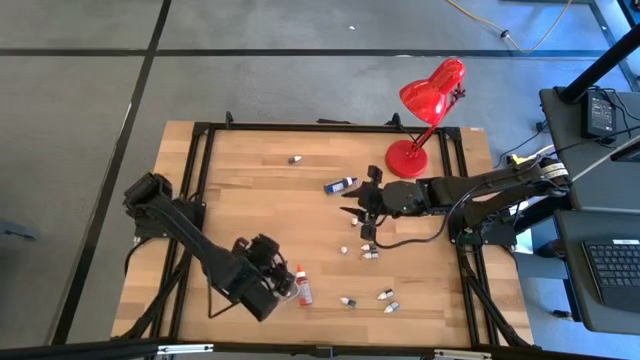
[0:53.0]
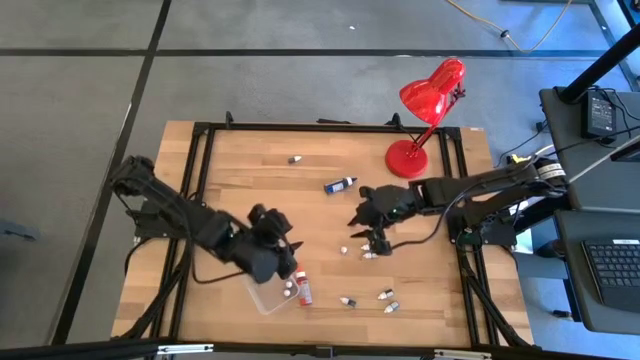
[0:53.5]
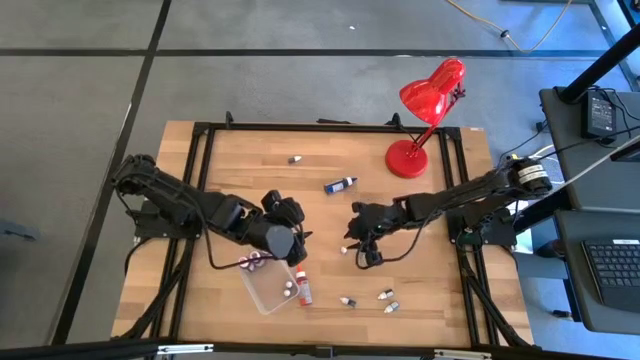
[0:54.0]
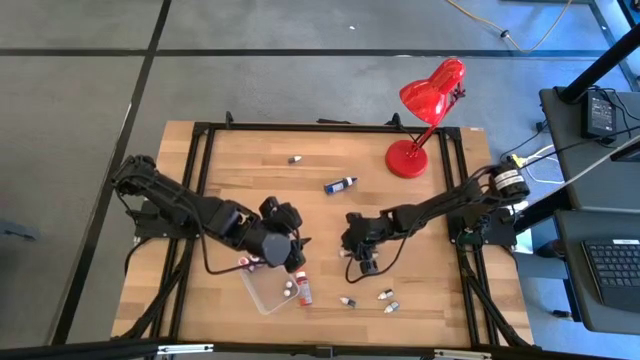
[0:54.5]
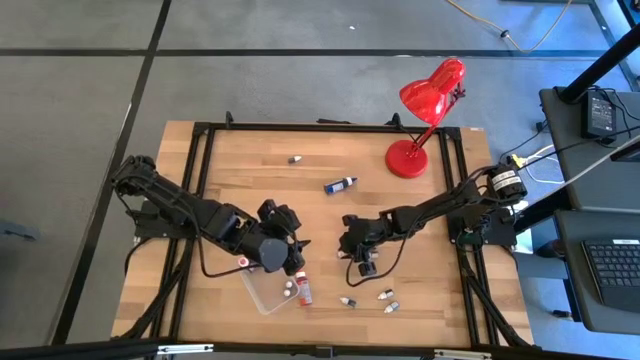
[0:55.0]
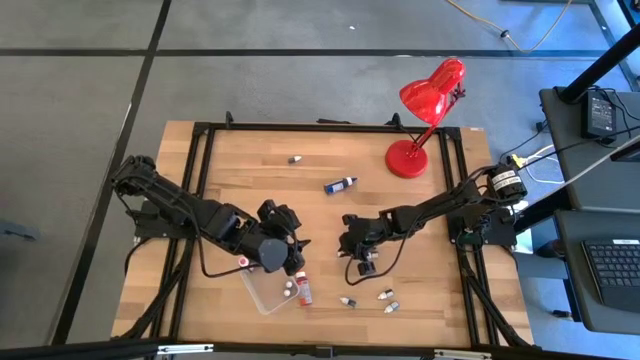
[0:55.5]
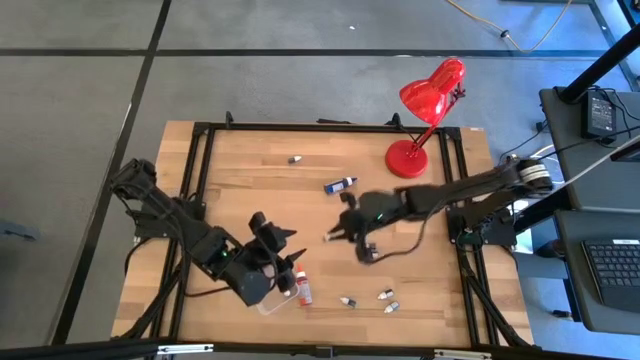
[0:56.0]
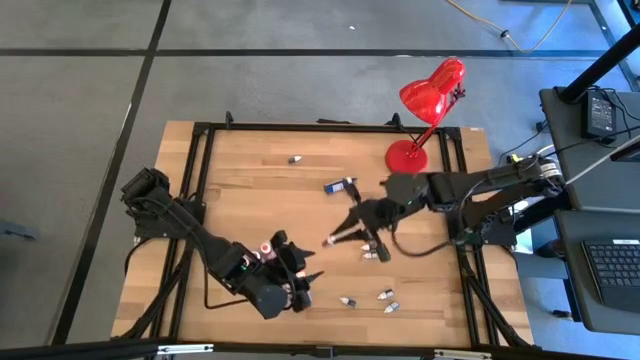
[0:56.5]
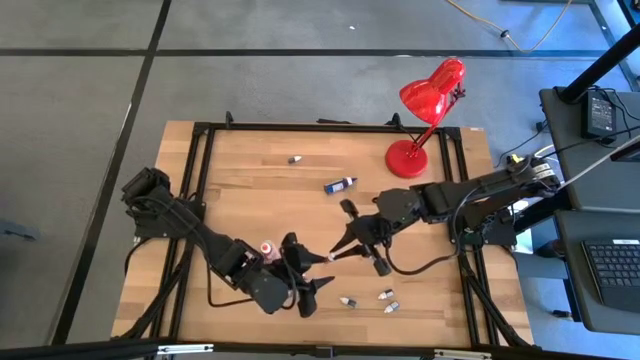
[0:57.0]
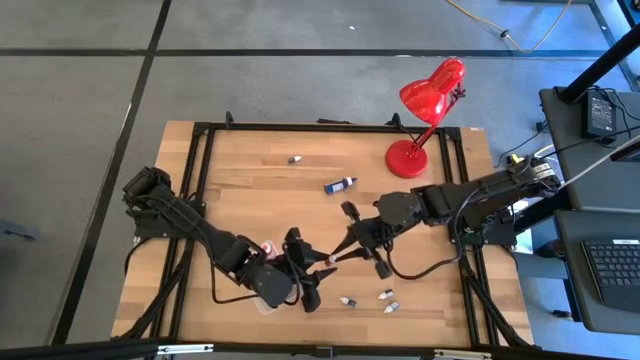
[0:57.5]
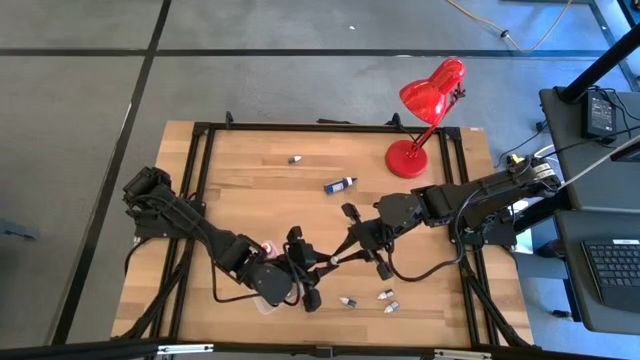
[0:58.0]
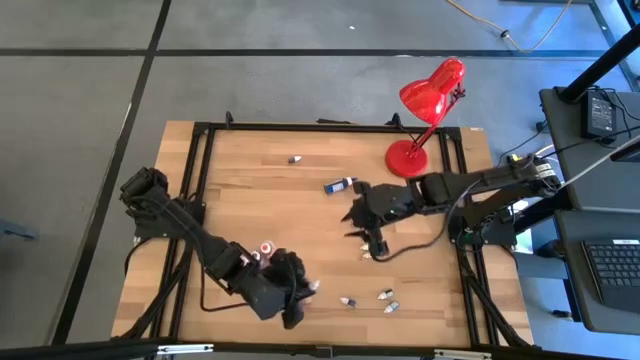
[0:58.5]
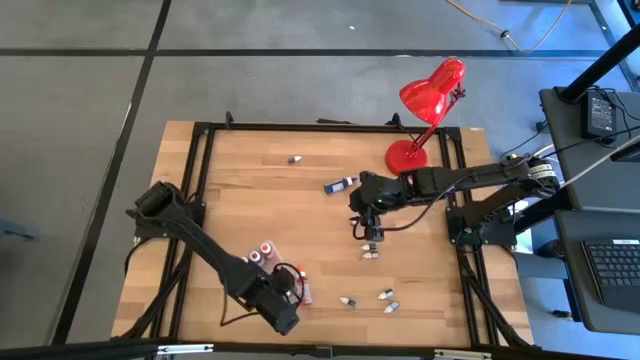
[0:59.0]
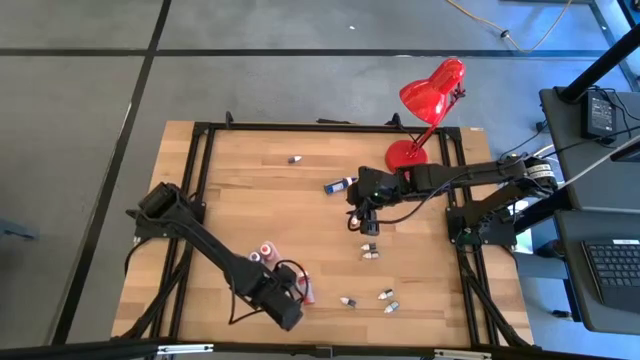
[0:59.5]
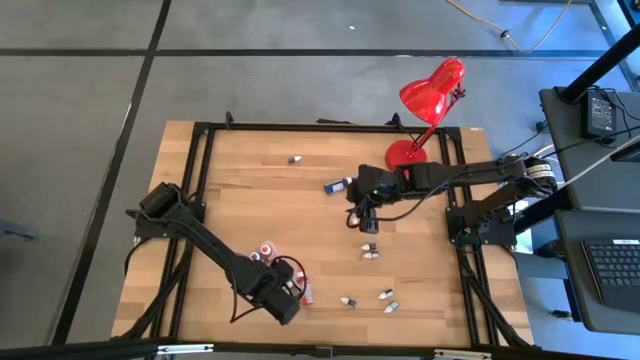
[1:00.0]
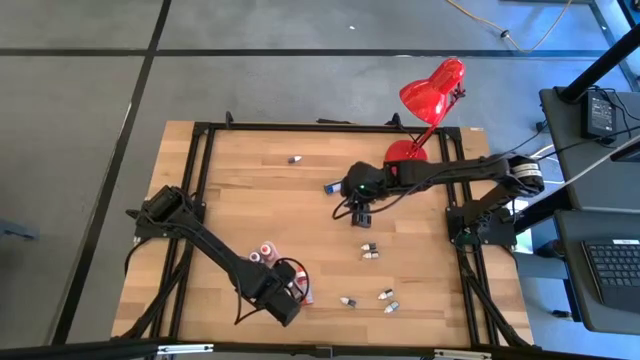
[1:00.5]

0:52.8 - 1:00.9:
Task: Pick & Place food coloring
Put the pink food coloring bottle into the transparent bin

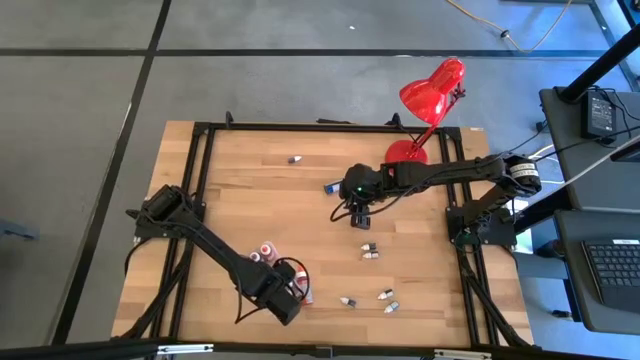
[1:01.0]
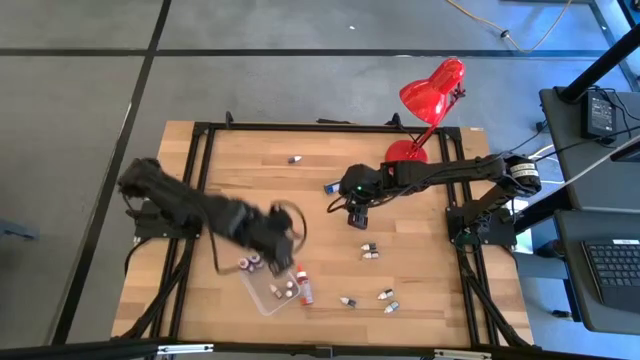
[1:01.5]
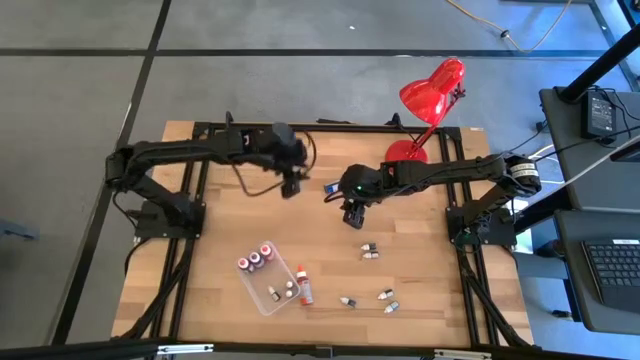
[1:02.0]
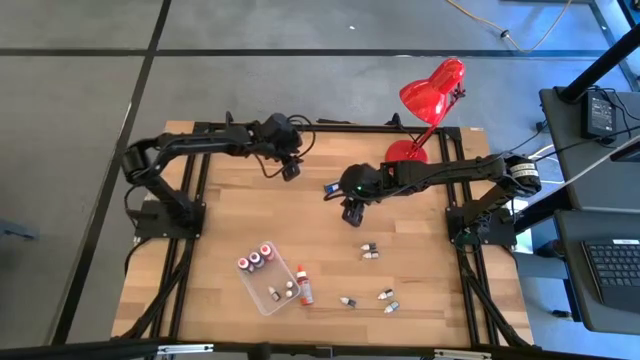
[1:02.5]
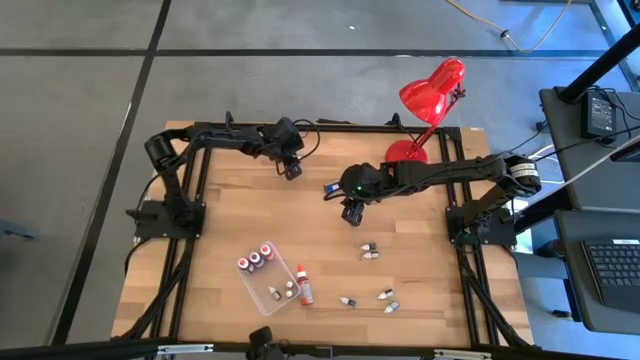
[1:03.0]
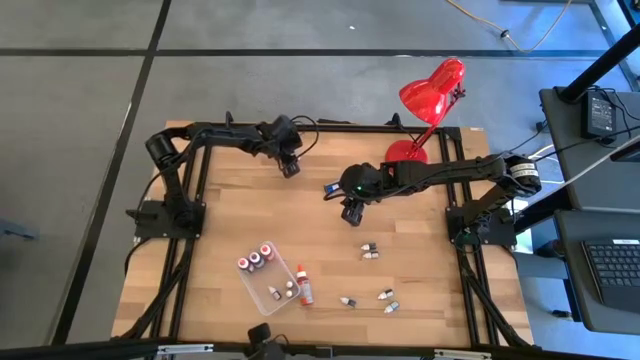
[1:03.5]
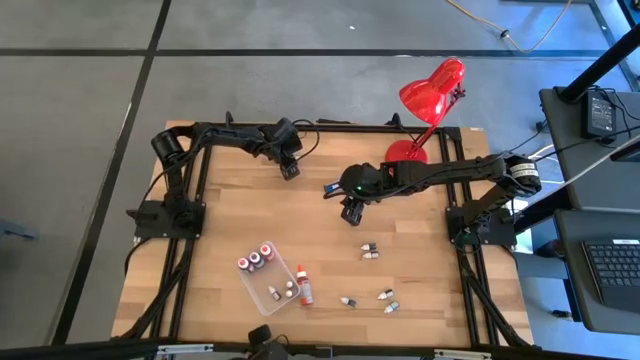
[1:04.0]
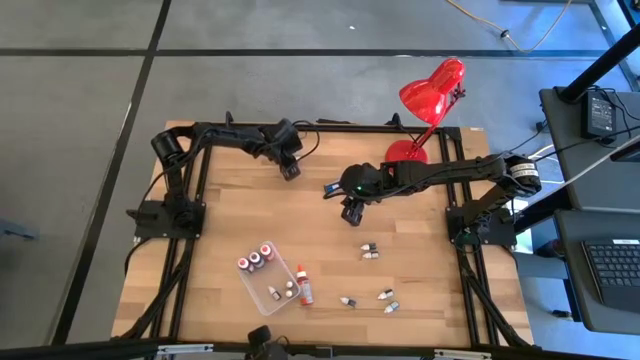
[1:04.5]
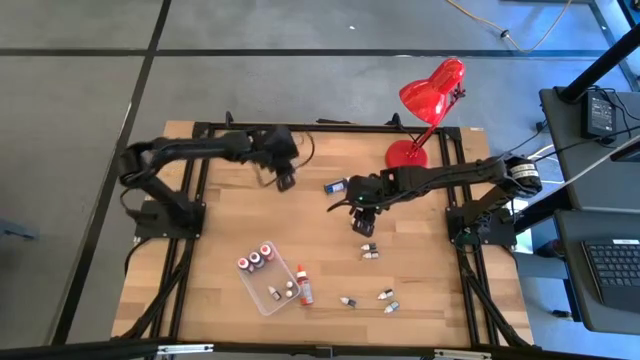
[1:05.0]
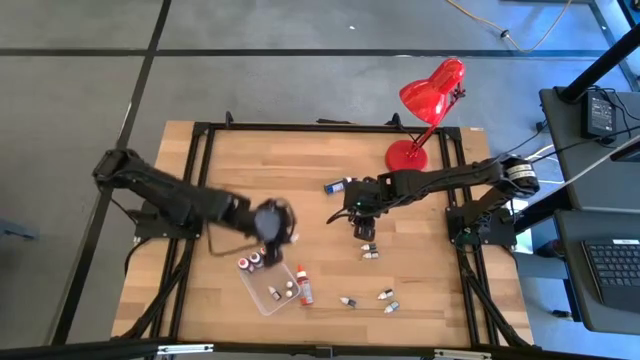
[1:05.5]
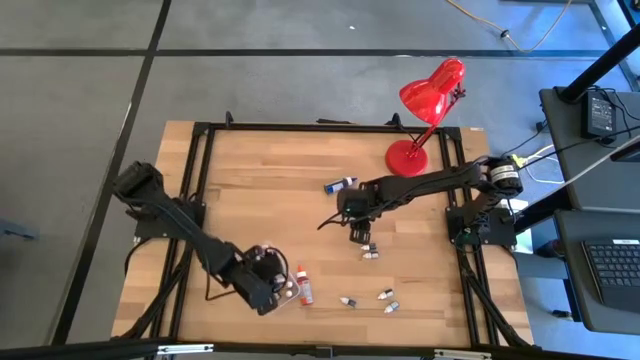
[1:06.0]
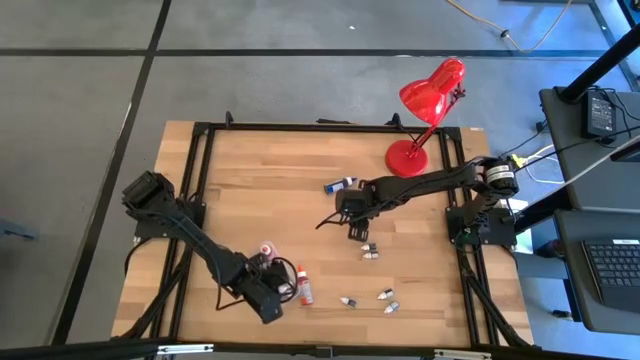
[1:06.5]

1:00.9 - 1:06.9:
Put the green food coloring bottle into the transparent bin

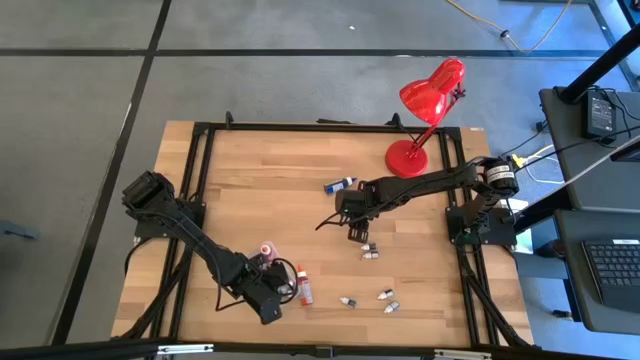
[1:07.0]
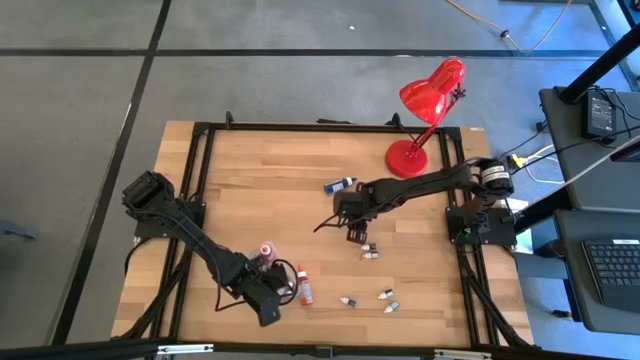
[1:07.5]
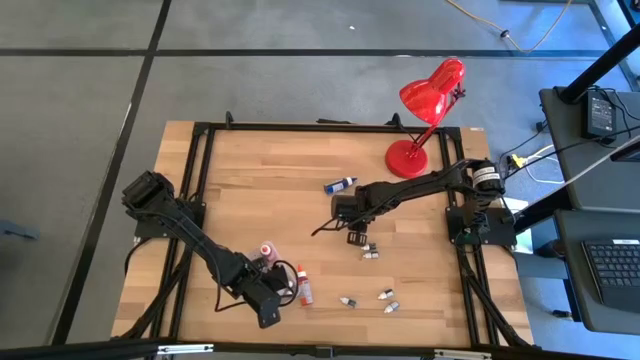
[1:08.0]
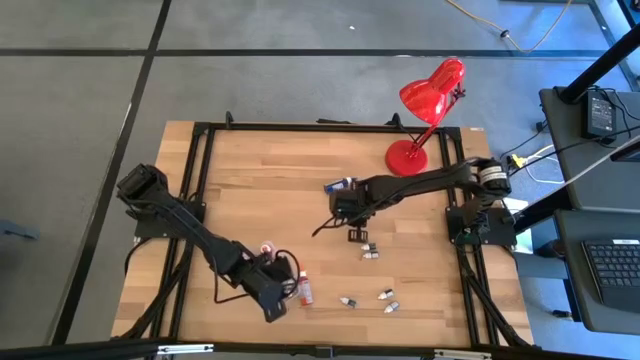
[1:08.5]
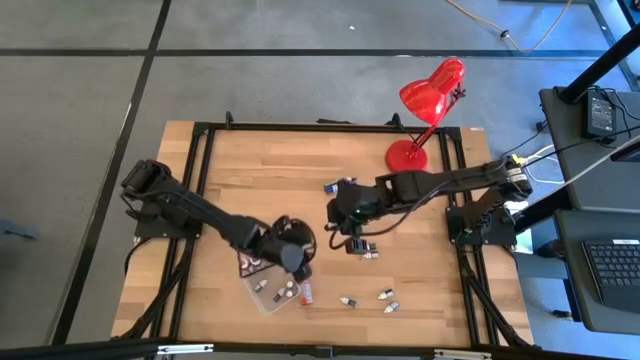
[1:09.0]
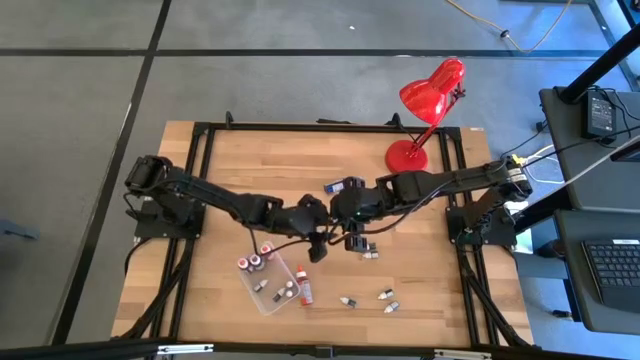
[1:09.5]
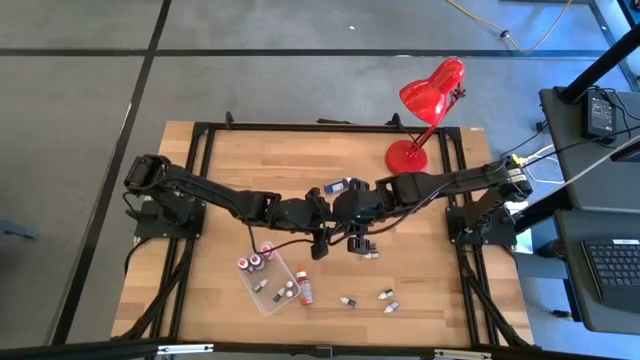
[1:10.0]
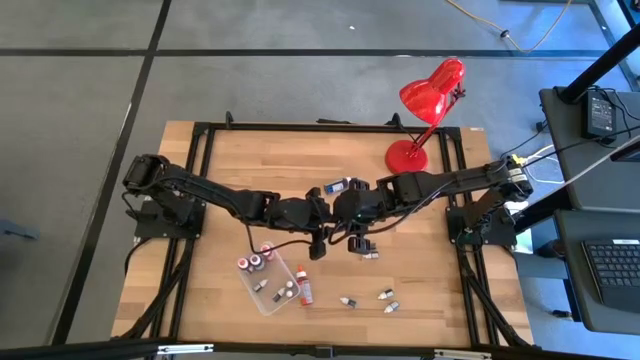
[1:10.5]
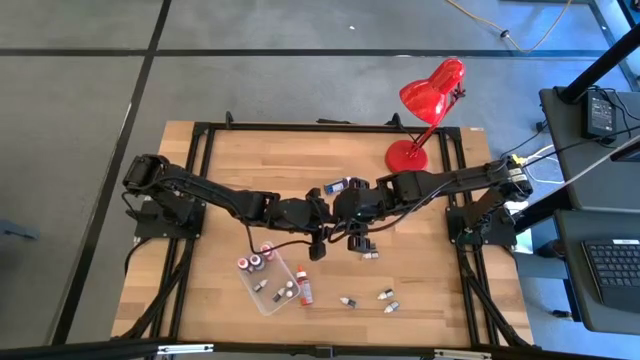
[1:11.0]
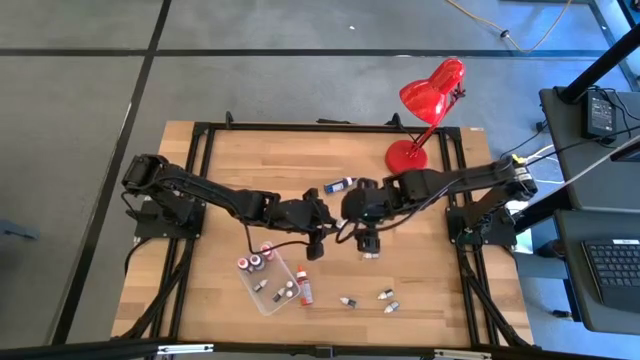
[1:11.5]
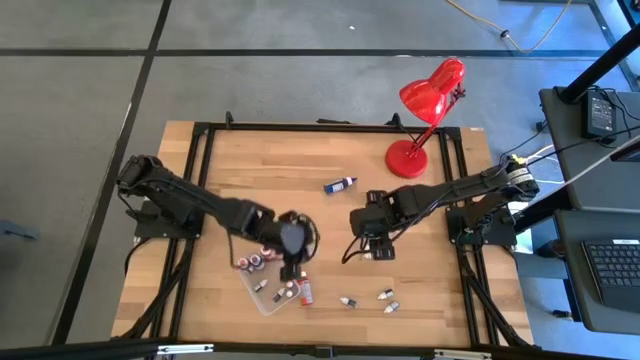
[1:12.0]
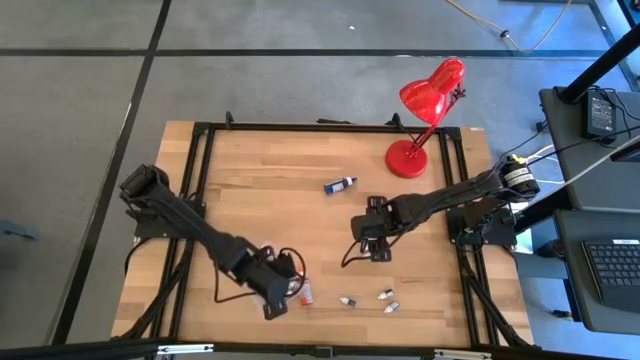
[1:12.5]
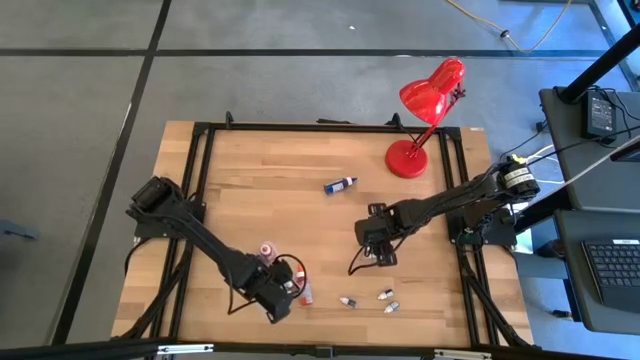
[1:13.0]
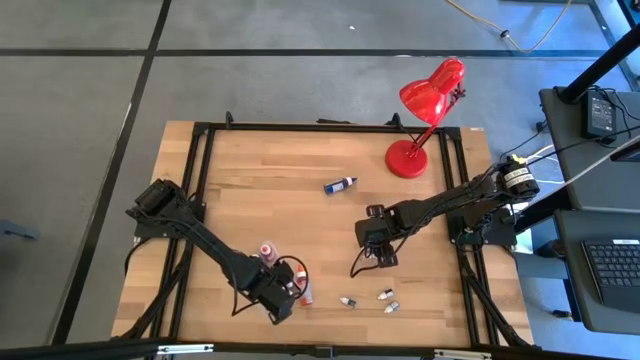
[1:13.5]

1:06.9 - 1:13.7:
Put the pink food coloring bottle into the transparent bin
